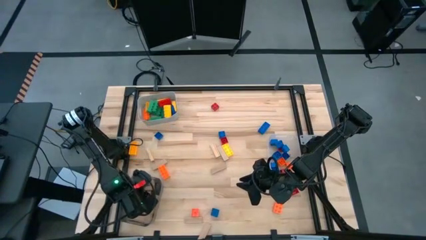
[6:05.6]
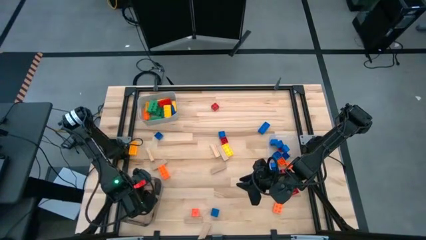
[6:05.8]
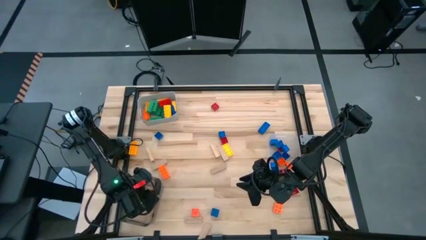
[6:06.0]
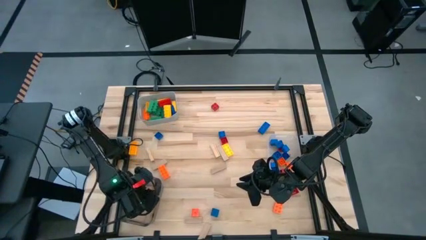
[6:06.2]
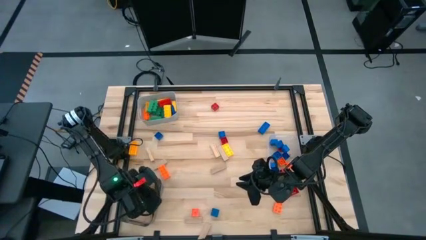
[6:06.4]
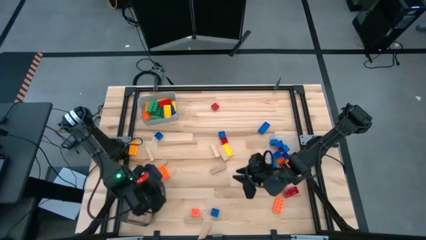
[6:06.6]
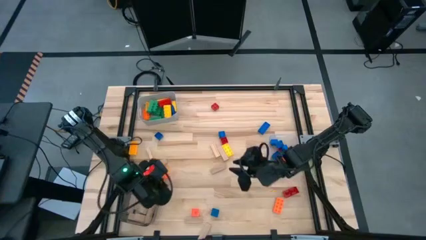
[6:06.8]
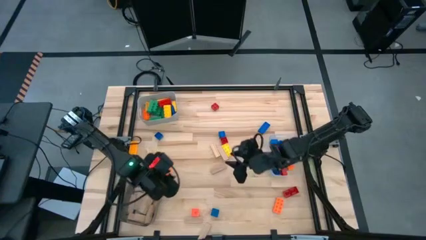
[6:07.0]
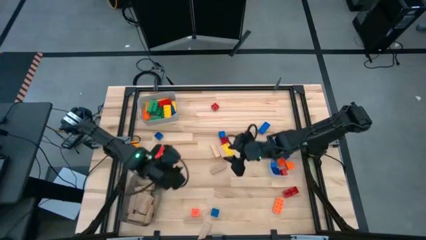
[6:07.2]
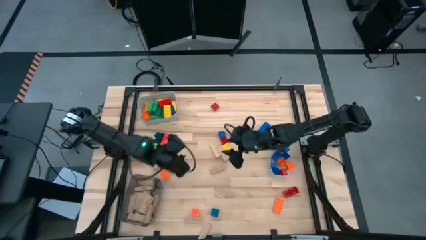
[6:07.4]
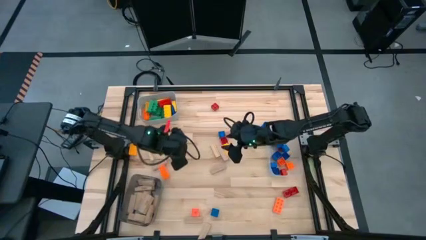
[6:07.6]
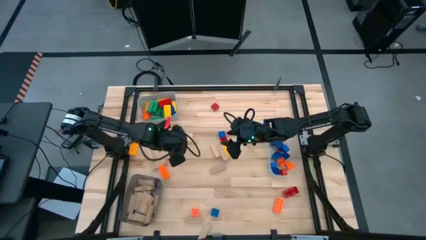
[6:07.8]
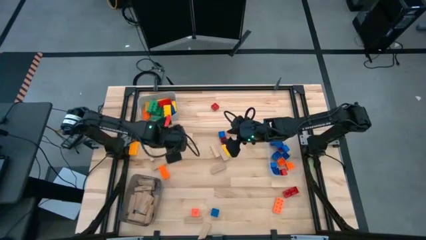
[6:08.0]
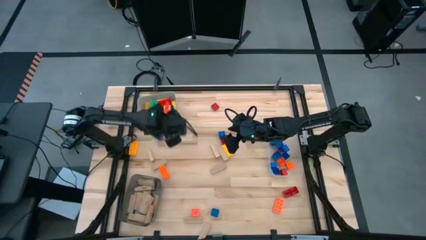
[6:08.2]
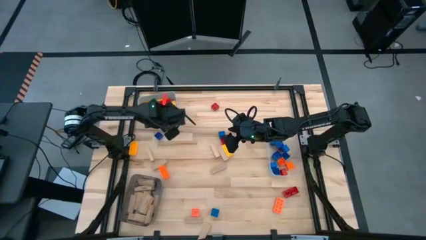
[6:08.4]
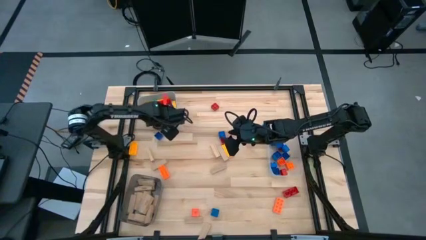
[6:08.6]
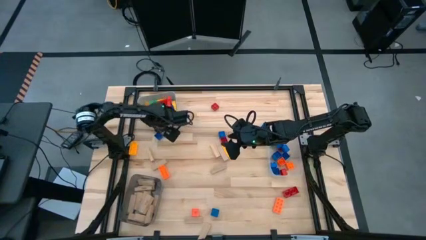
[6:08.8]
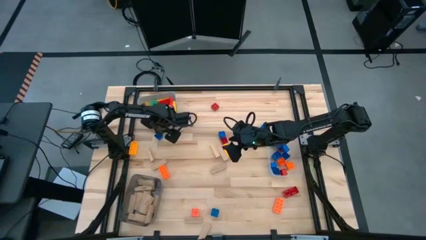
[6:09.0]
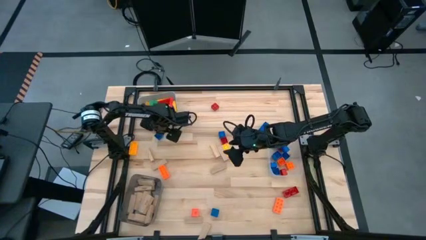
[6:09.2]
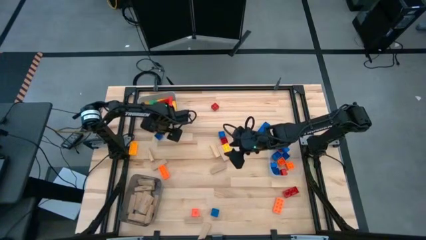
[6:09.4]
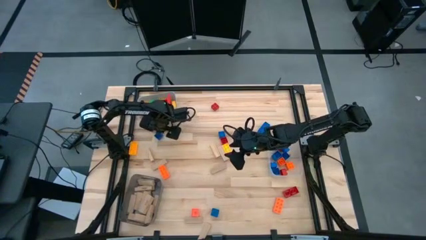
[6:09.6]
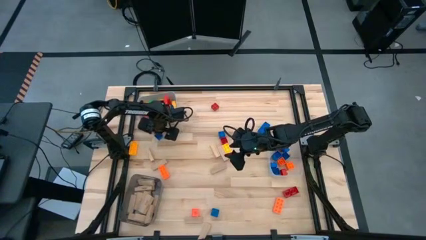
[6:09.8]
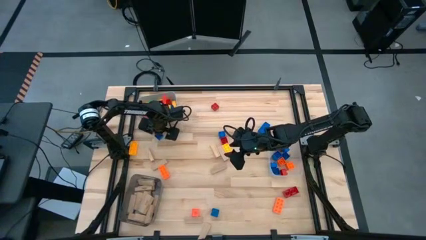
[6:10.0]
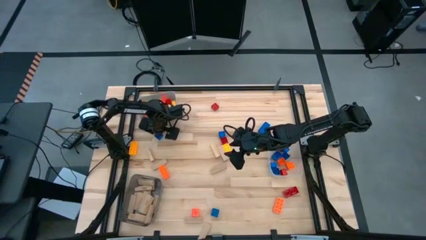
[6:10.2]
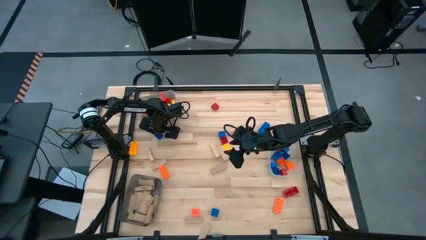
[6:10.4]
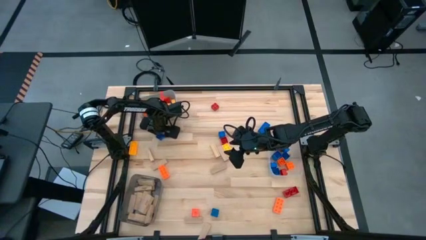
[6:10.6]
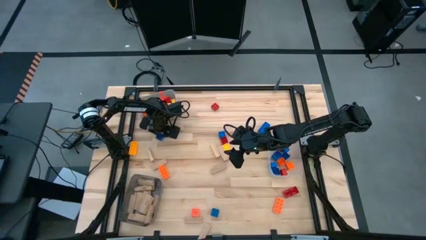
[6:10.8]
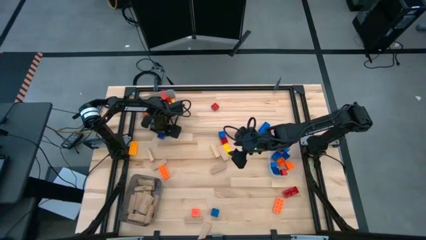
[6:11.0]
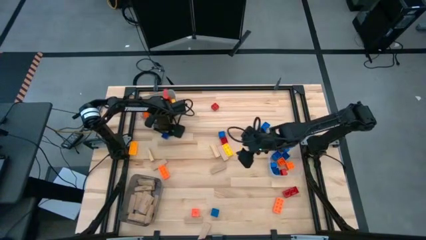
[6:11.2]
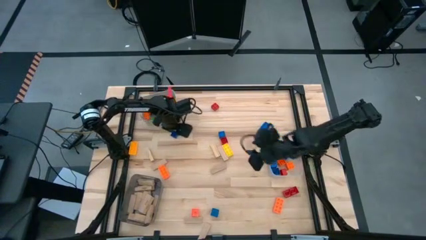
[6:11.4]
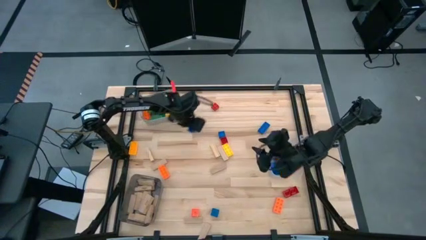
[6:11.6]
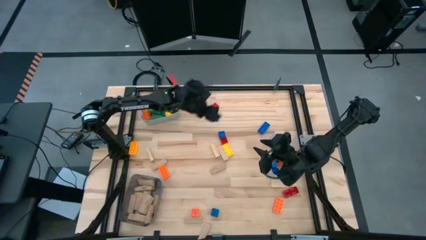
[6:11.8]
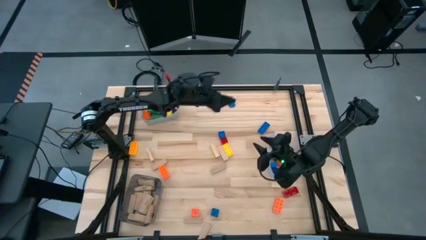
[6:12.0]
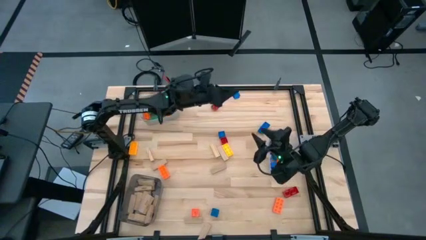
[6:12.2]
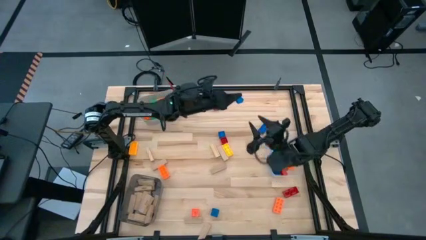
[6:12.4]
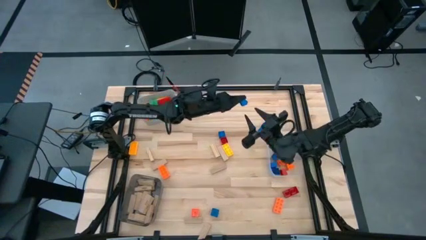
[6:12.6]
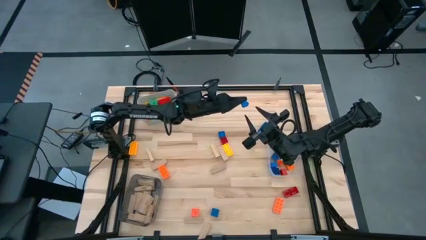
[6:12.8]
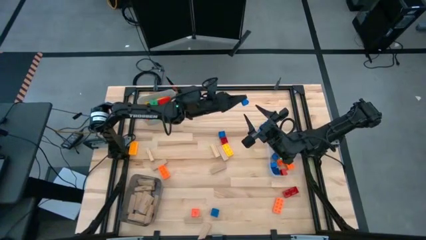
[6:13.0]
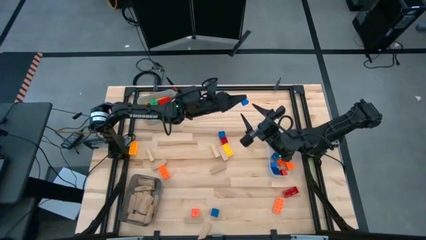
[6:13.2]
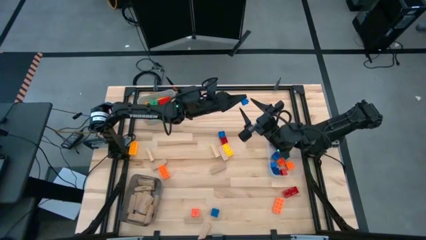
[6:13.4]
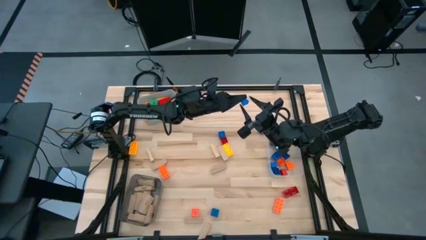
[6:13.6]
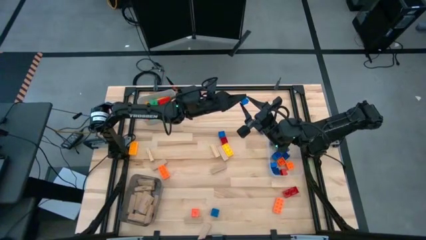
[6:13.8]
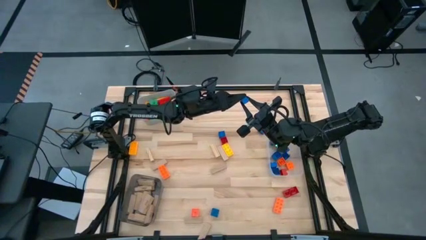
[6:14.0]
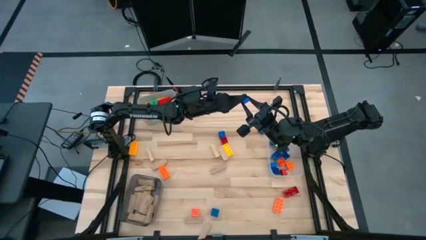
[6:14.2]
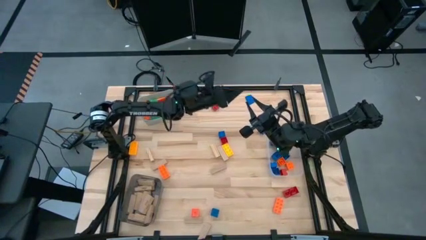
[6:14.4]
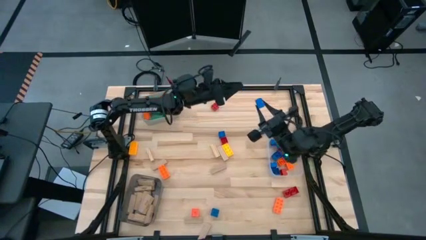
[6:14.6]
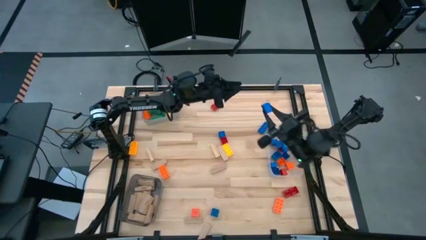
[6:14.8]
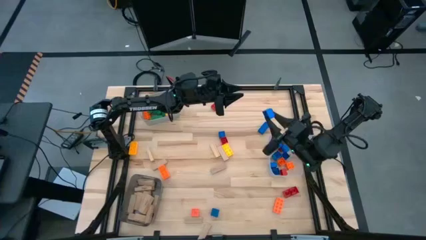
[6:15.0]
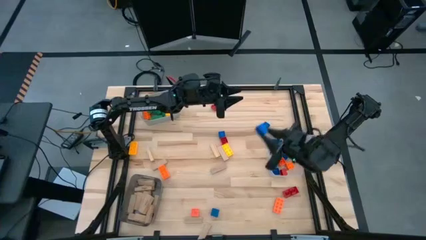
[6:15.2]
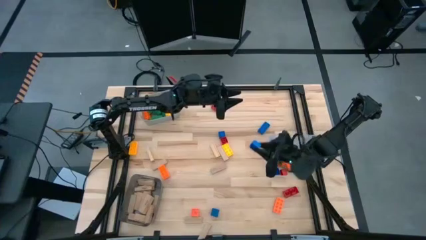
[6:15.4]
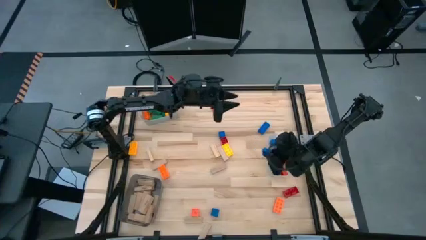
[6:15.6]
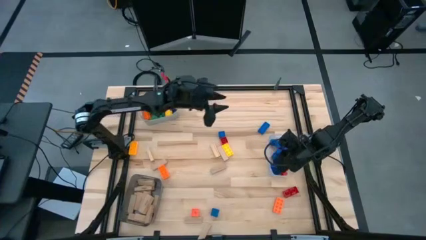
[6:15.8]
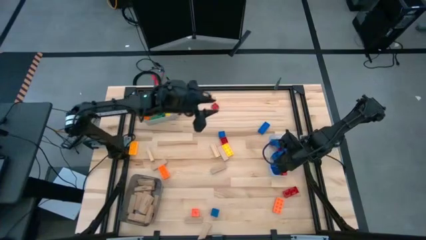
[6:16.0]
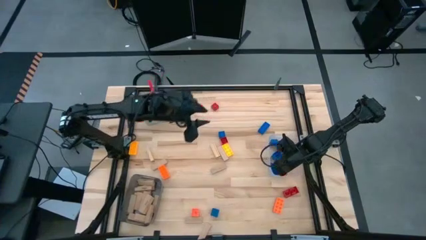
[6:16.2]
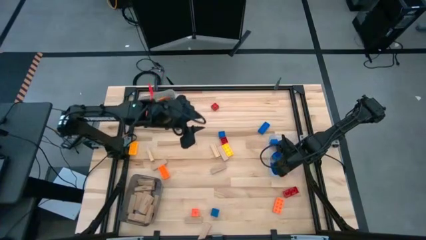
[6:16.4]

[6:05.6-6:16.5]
Task: Sort blocks by size
Put the small blue game piece into the transparent bin

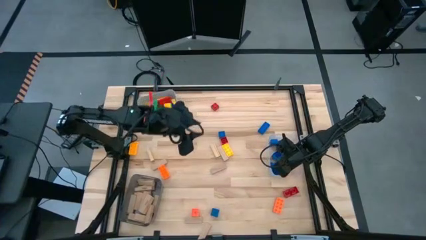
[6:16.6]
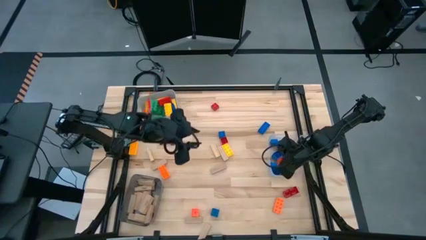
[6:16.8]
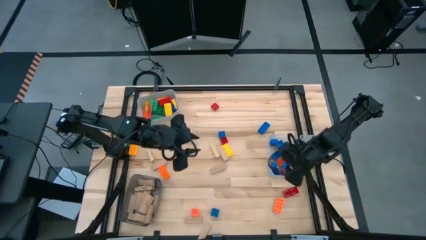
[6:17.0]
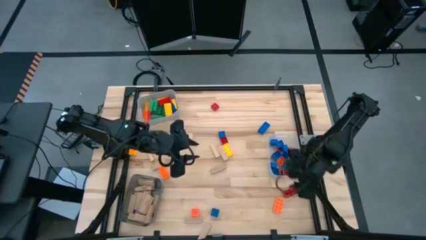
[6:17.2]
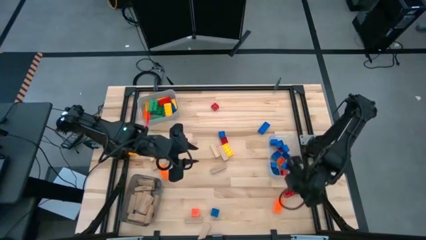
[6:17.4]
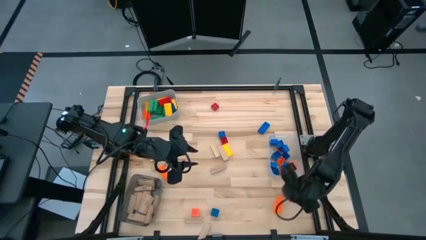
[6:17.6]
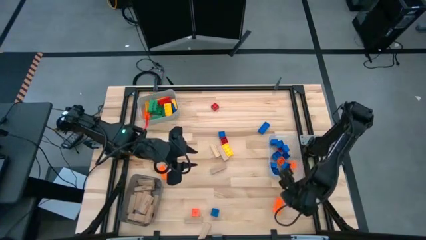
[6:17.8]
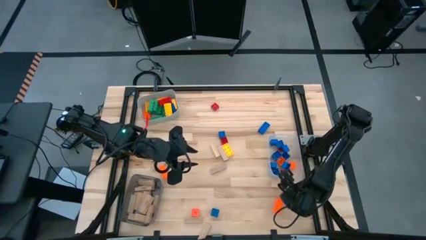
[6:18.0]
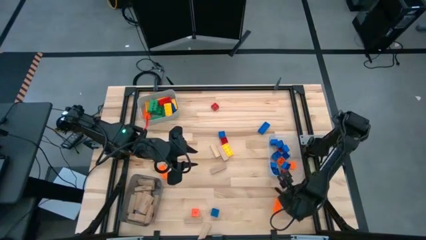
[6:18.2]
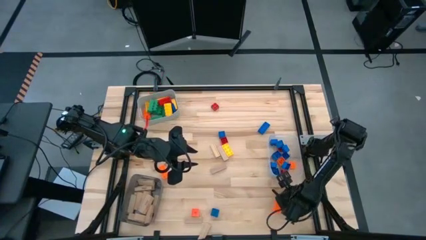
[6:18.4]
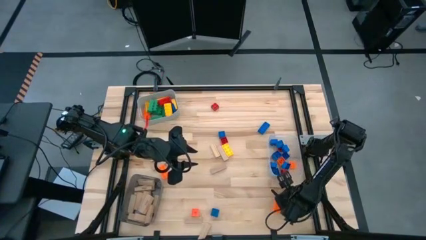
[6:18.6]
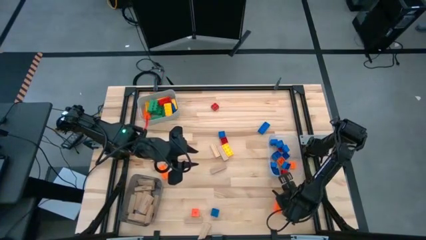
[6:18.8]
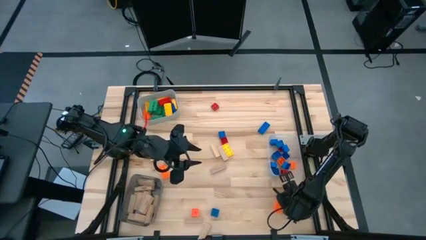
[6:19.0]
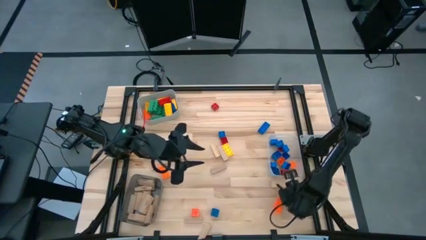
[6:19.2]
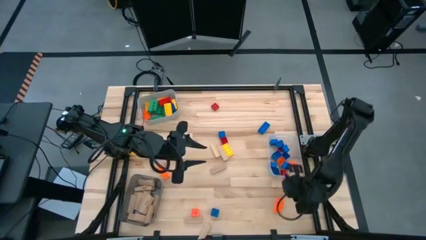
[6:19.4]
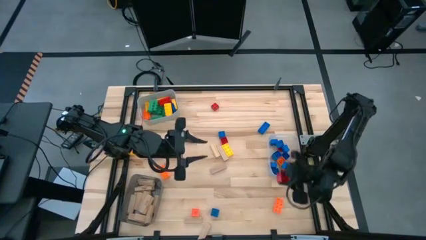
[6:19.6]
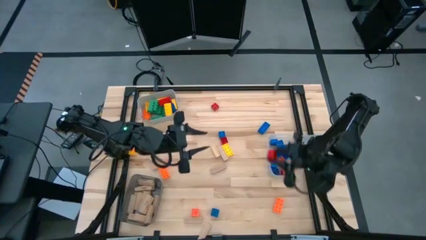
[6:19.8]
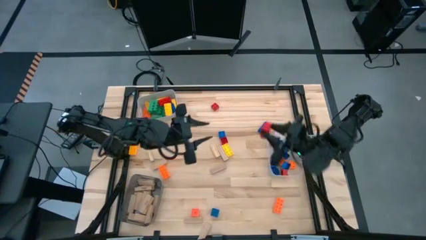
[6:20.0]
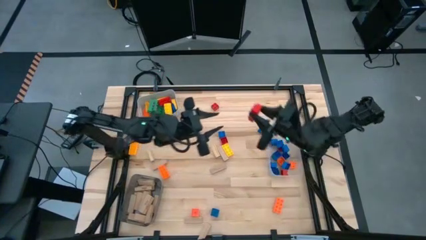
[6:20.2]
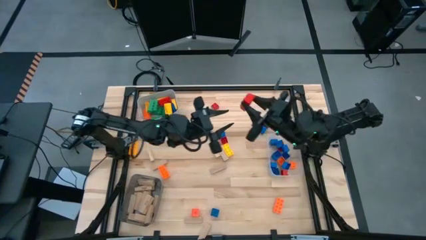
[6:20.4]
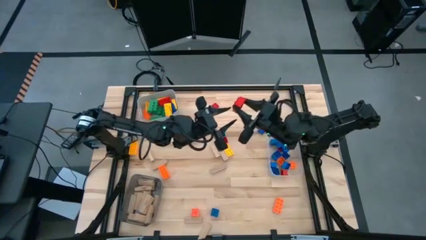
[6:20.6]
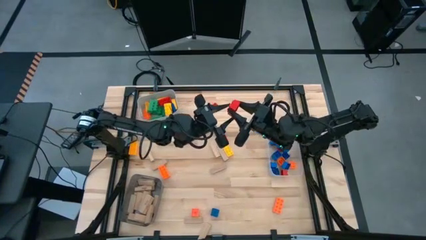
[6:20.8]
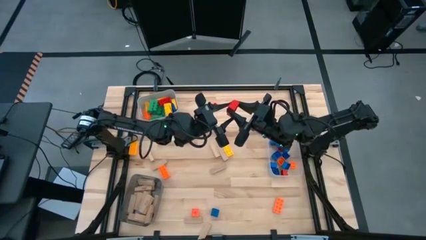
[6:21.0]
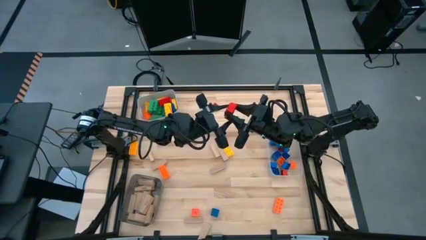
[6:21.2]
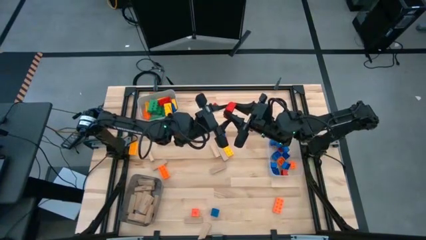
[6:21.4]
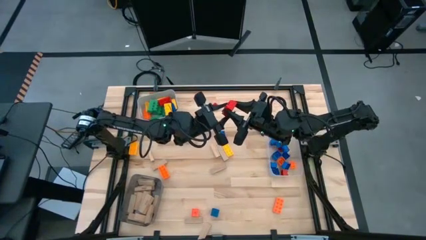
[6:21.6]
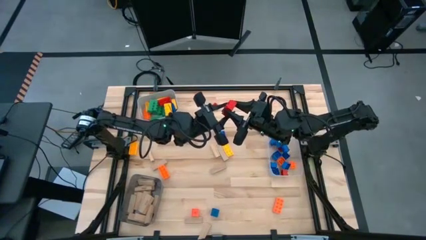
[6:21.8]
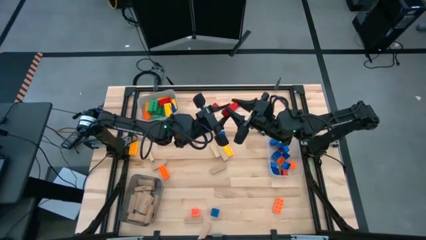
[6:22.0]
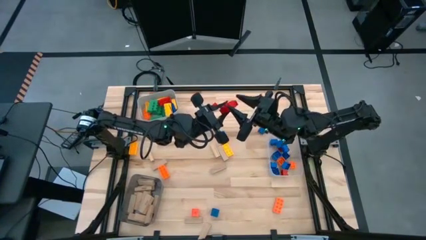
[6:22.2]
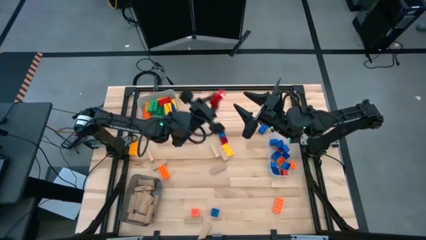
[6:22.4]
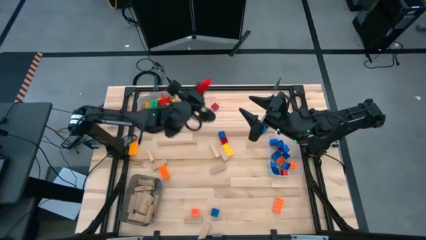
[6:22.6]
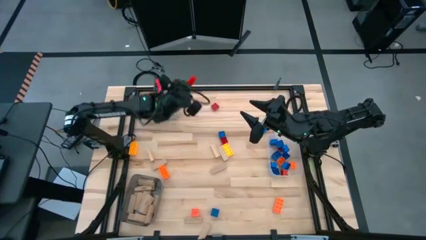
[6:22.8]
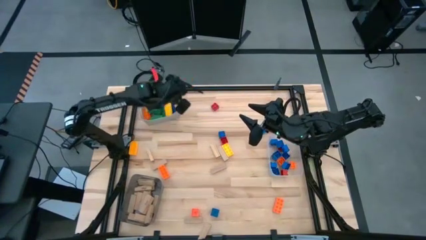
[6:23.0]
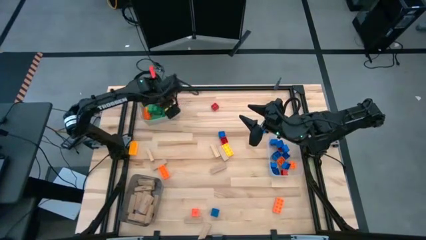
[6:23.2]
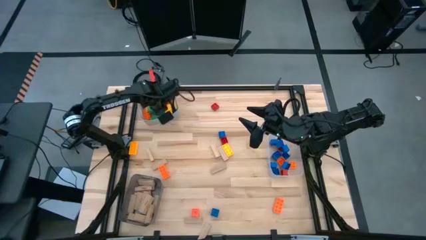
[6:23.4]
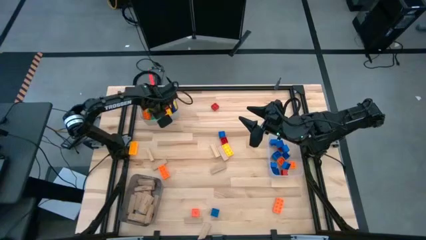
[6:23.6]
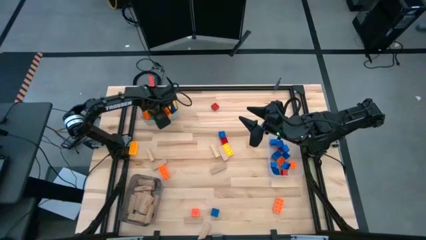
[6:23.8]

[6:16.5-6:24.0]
Put the large green red piece into the gray bin
